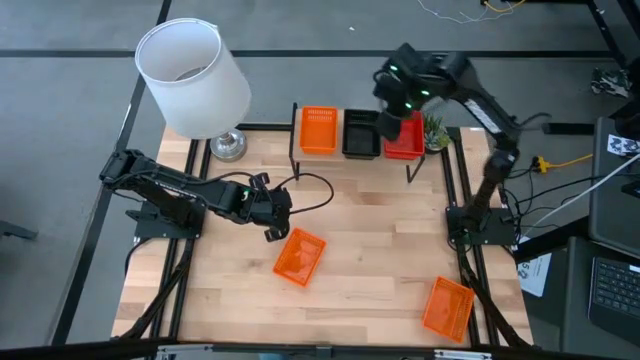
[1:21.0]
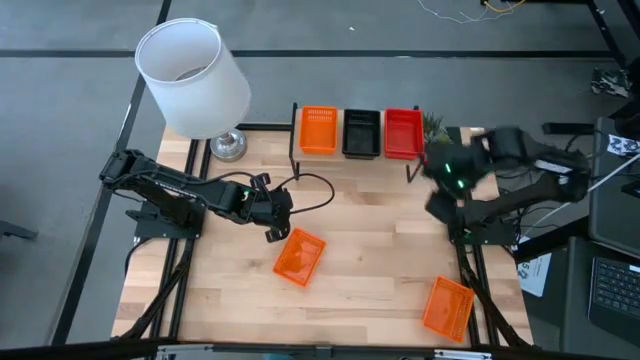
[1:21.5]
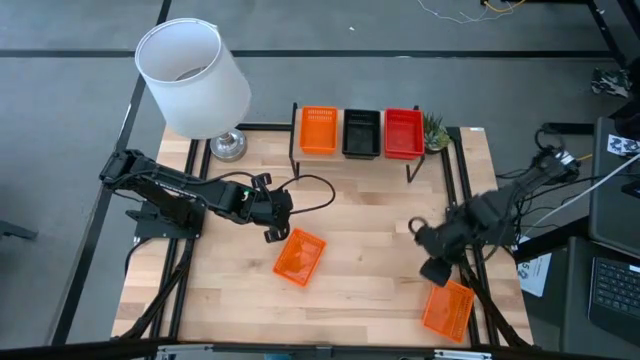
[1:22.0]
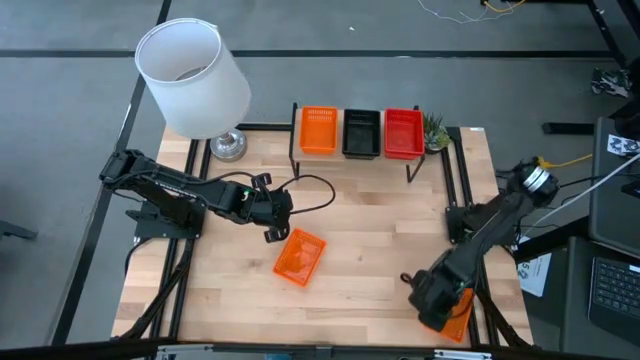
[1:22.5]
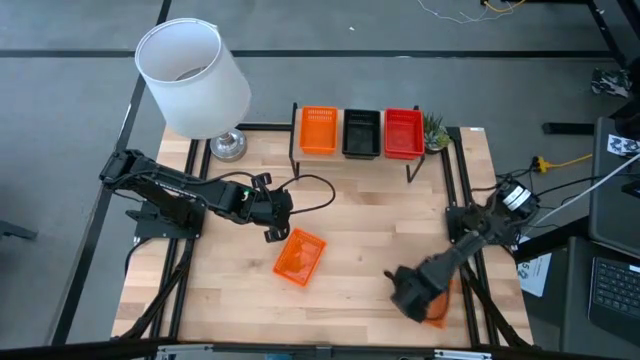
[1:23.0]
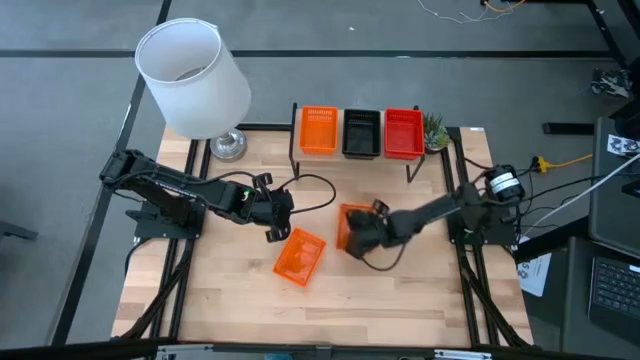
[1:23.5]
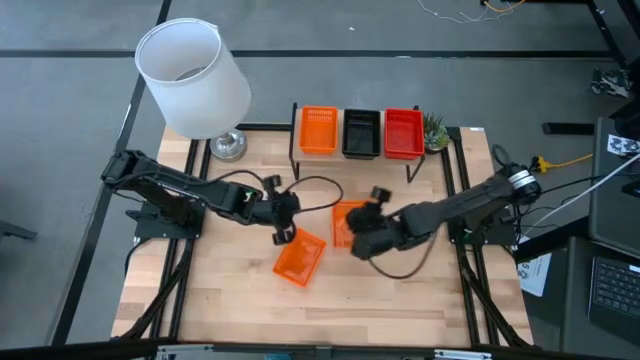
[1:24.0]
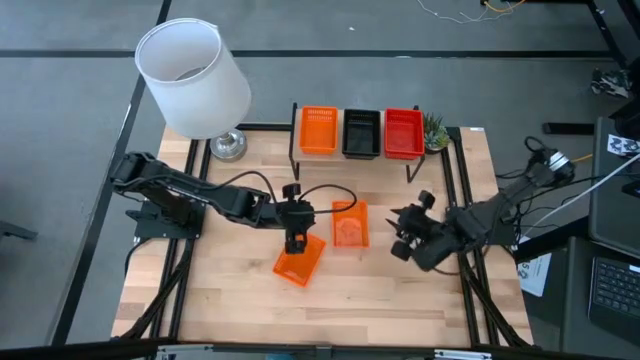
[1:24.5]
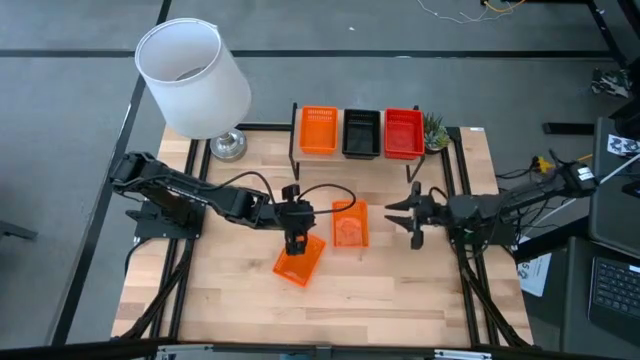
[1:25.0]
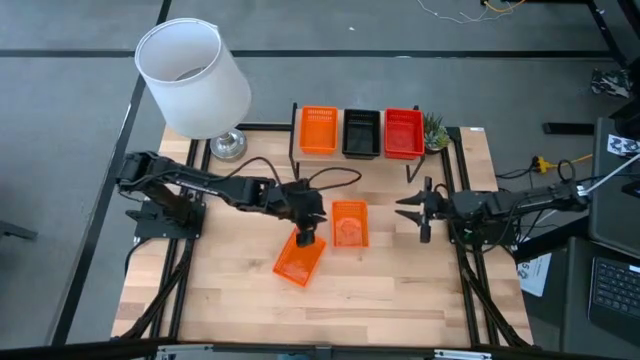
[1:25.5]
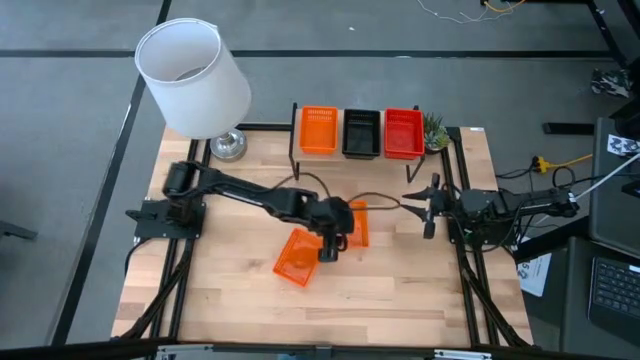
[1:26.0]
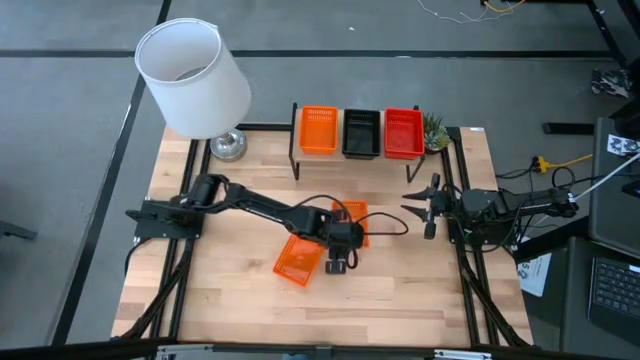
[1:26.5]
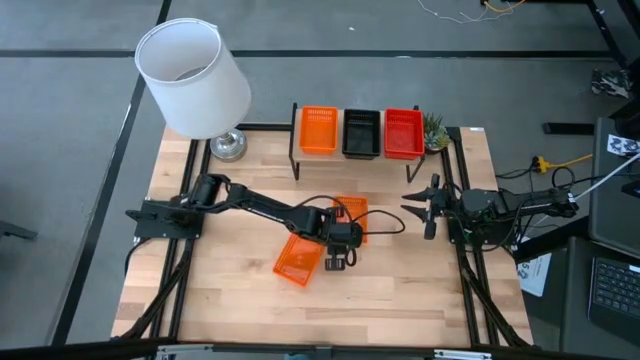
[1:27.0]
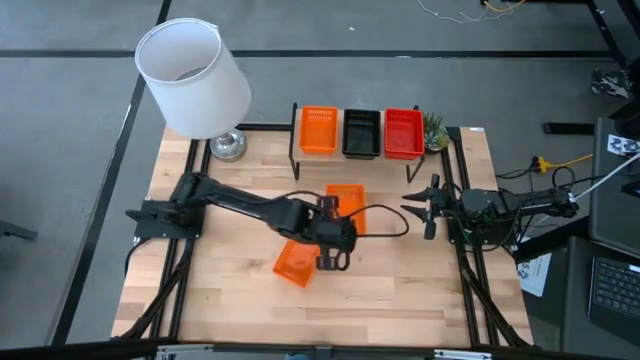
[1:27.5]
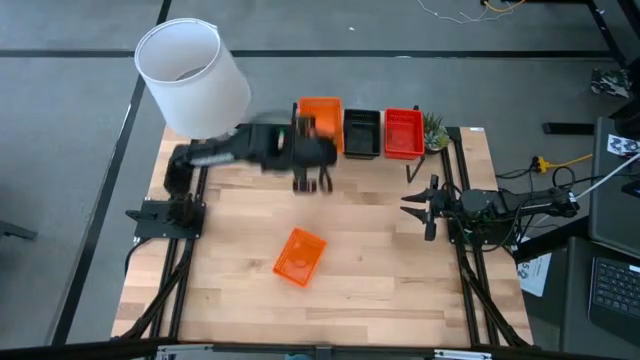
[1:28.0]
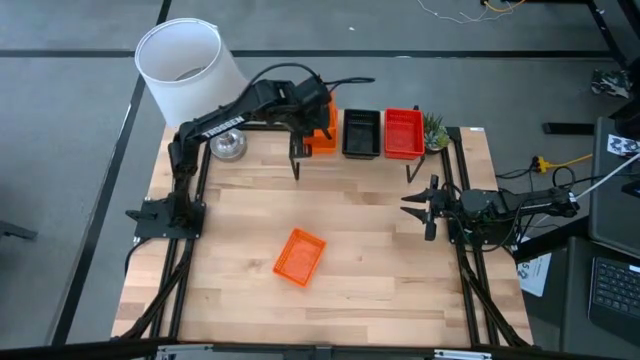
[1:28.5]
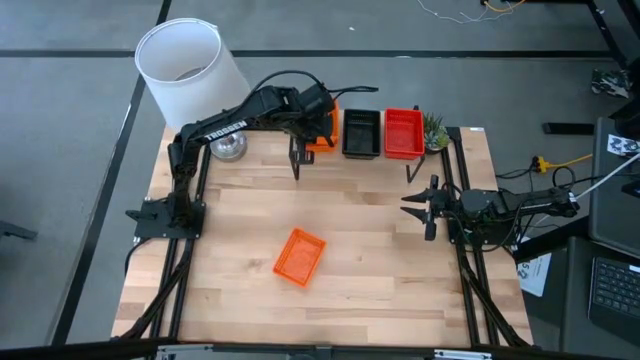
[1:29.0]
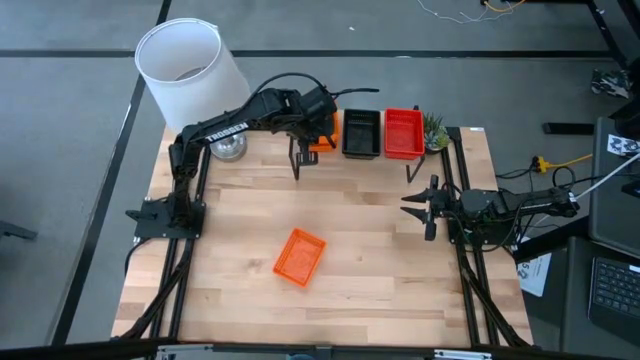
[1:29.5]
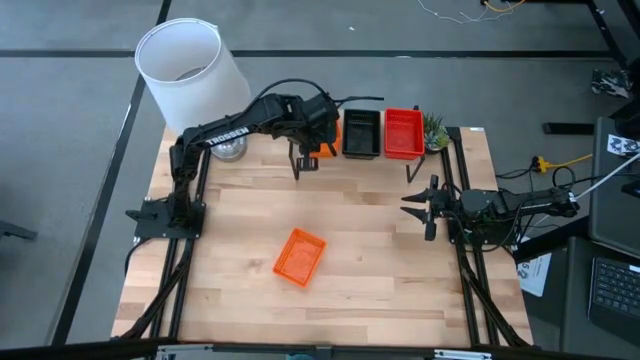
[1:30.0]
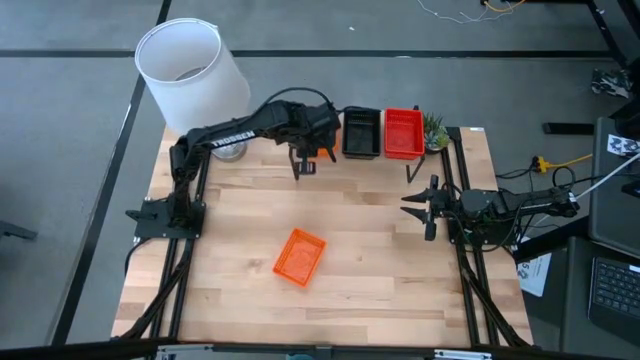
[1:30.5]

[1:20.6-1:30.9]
Task: Stack baskets on shelf by color
Stack the right orange basket on the other orange basket on the shelf

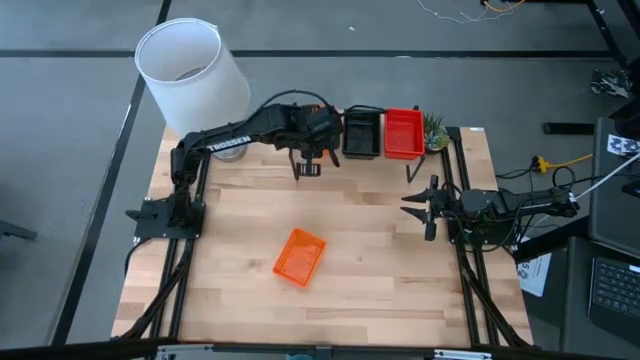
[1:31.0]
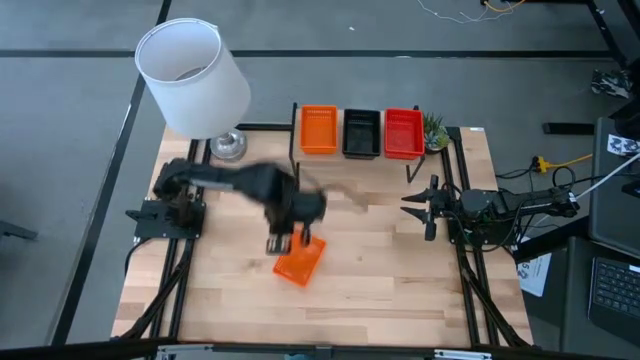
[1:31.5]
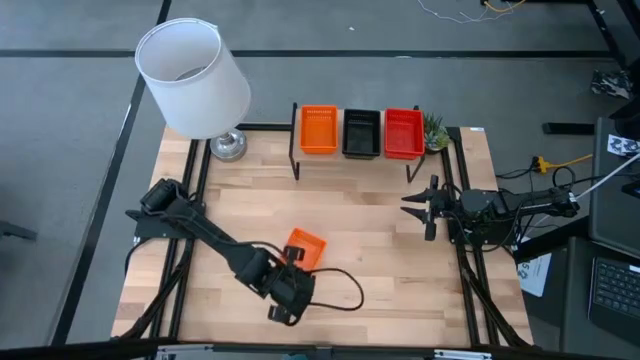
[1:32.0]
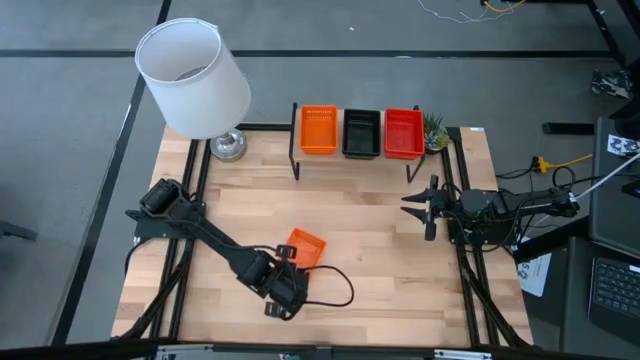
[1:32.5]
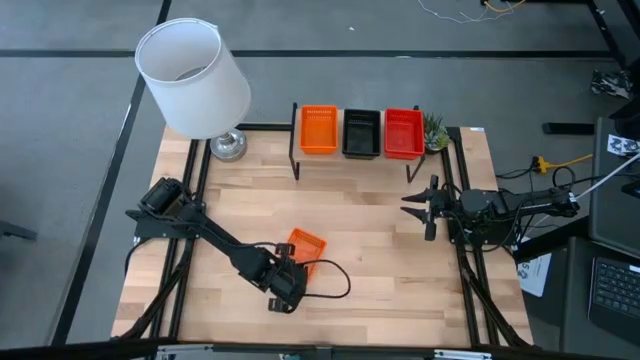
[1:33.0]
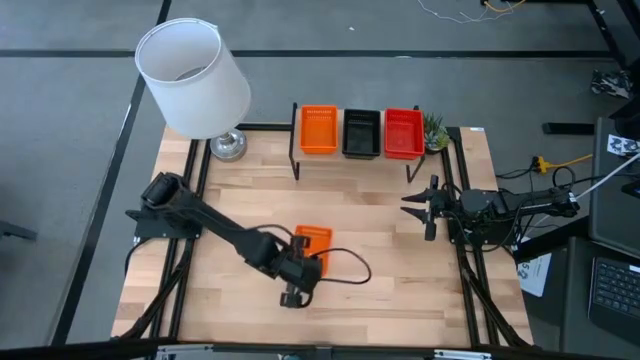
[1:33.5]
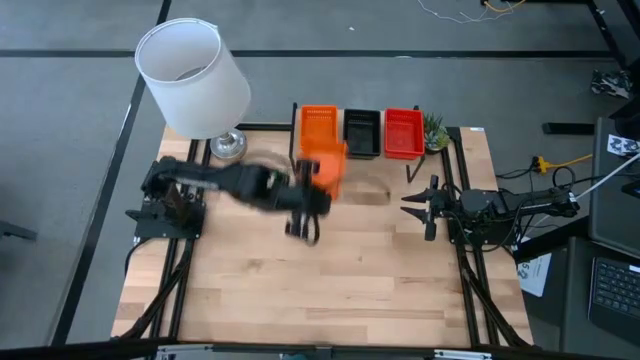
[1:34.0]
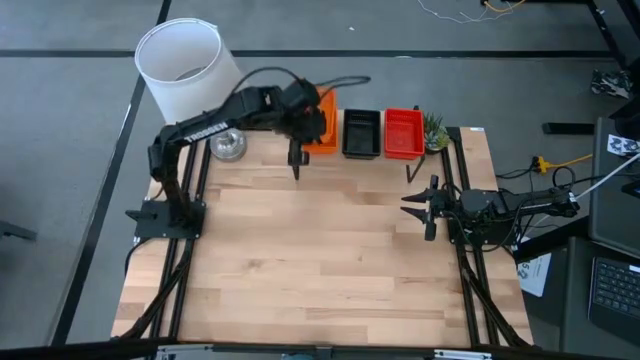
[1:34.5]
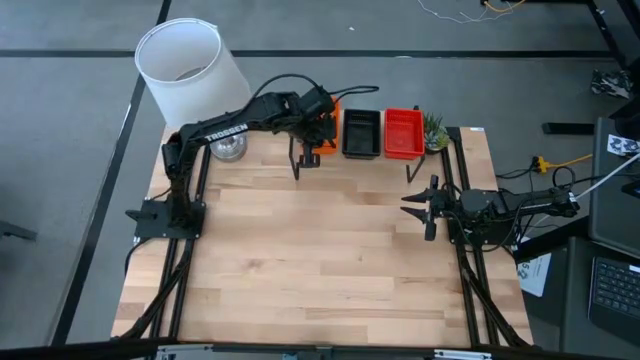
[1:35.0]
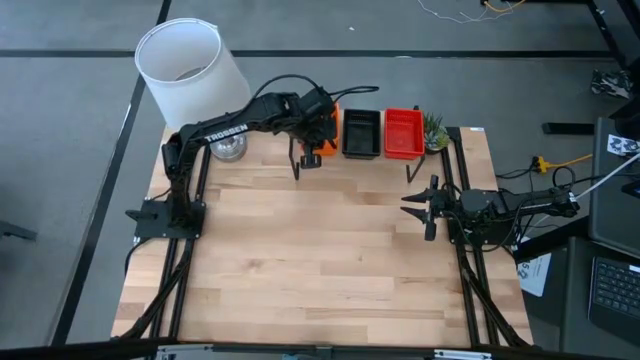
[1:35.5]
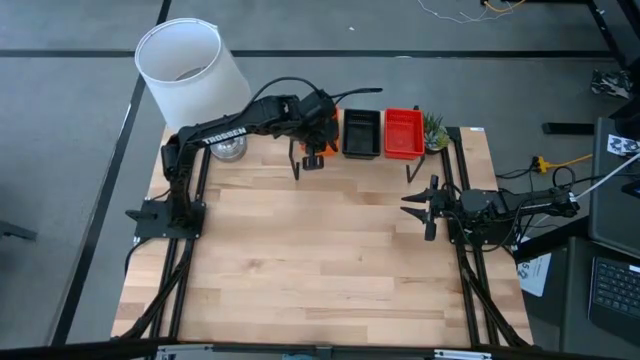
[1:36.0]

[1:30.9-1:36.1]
Stack the orange basket on the other orange basket on the shelf

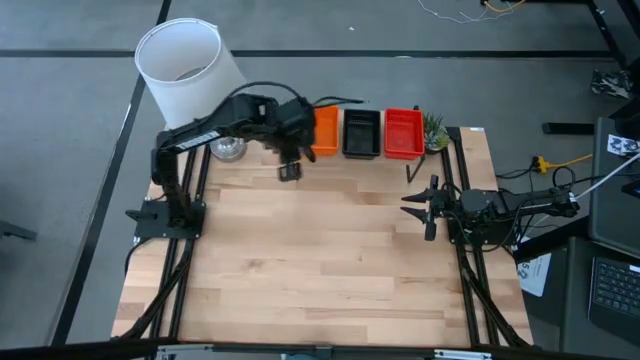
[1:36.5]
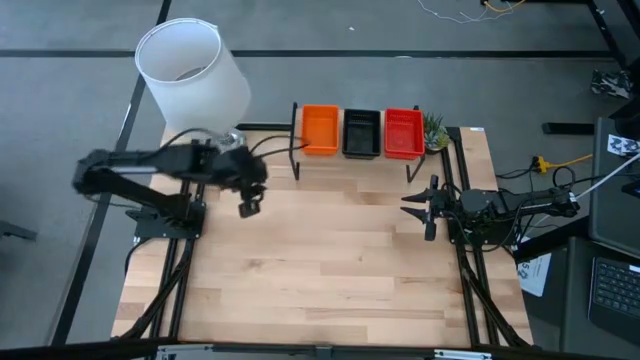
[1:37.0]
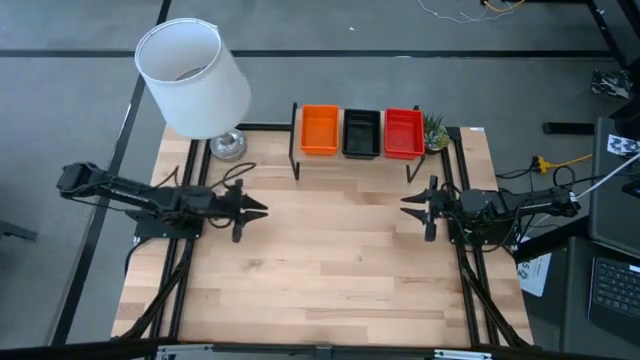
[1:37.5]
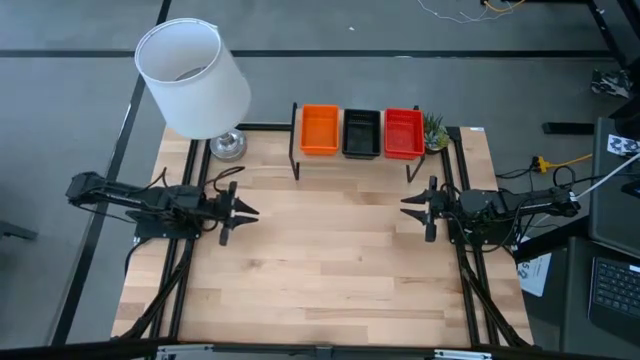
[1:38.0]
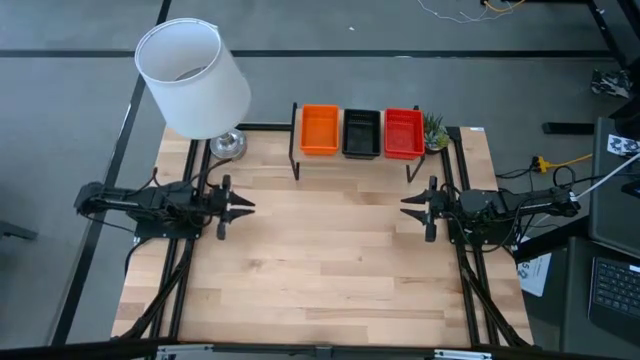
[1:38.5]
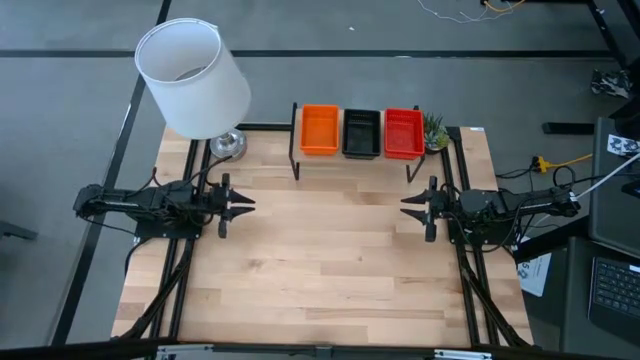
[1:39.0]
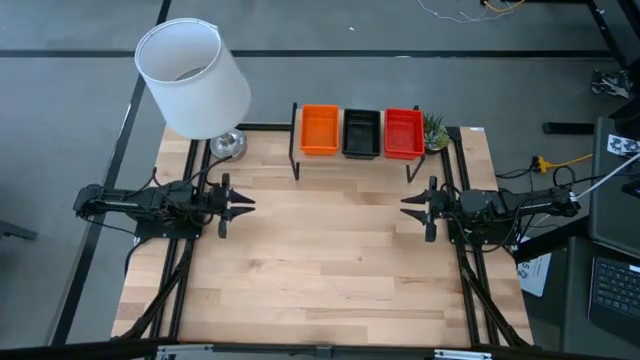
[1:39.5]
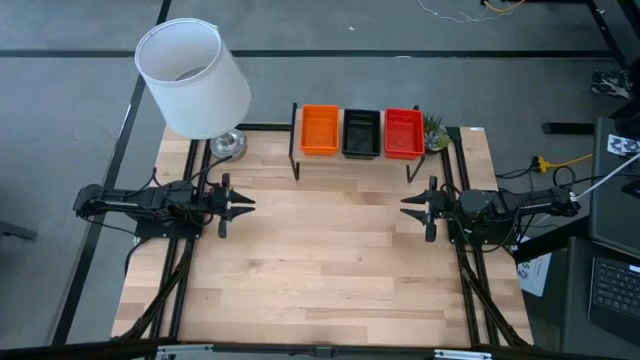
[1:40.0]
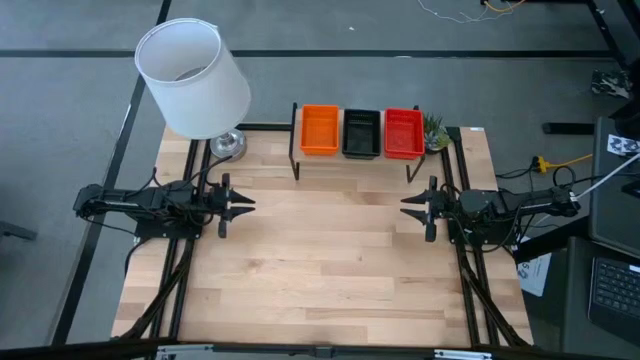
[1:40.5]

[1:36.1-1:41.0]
Return to Home Position

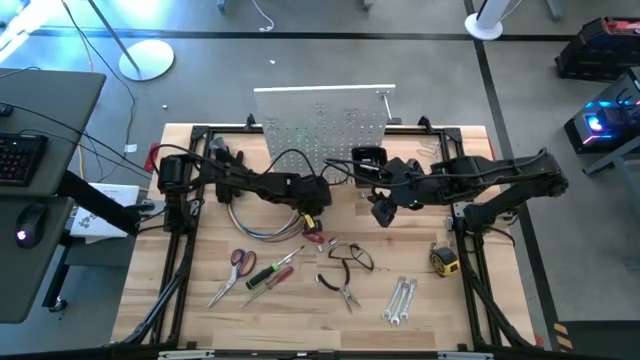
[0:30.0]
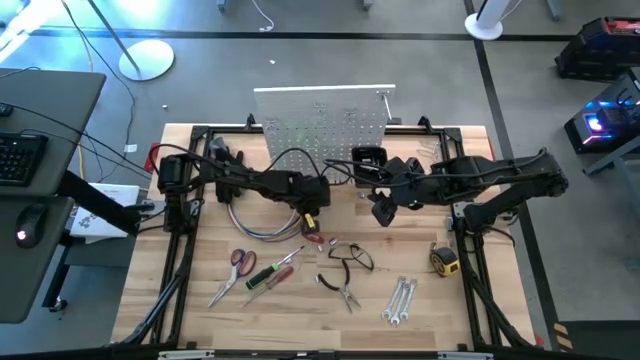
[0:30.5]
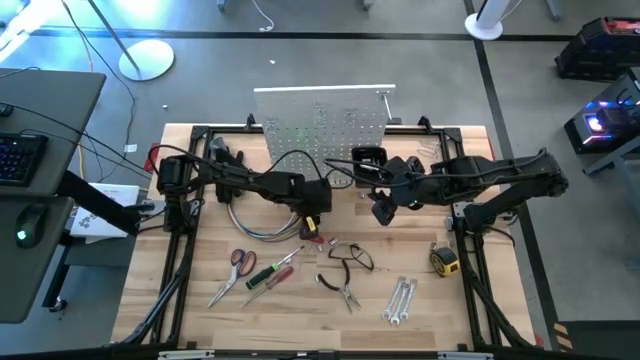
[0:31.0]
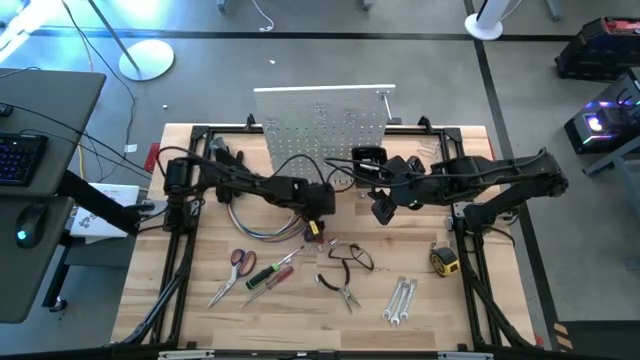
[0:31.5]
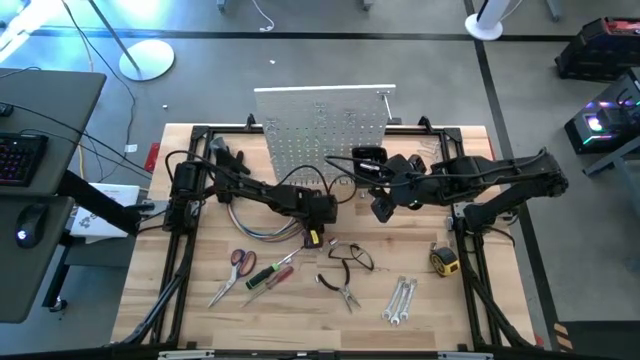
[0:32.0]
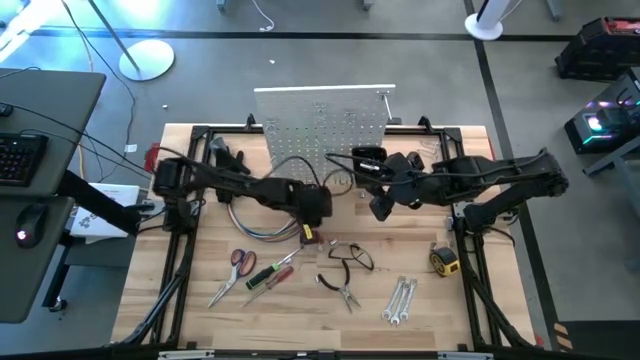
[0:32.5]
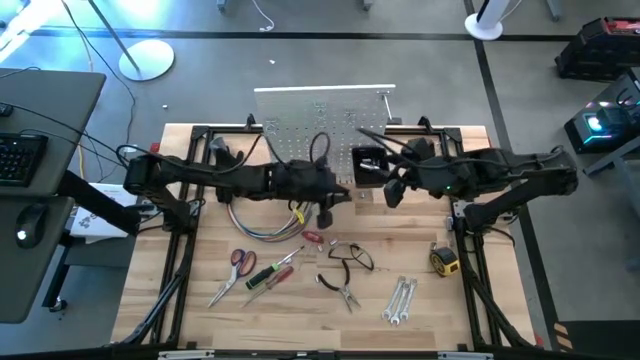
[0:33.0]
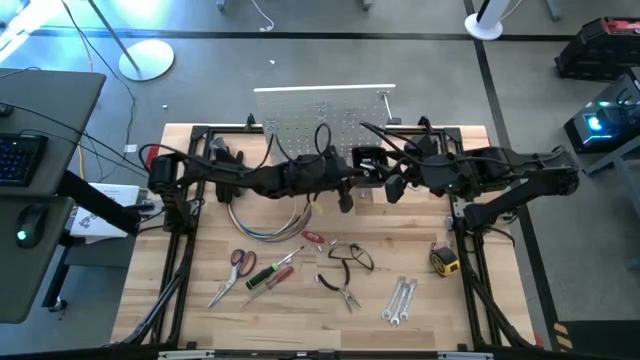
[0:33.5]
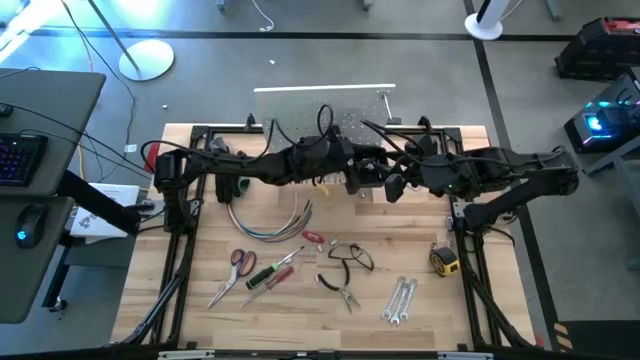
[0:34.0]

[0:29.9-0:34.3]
Task: Hang tools onto peg board
Put the socket into the black bin on the peg board
